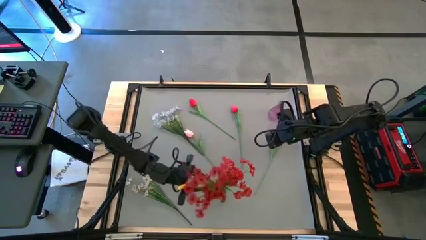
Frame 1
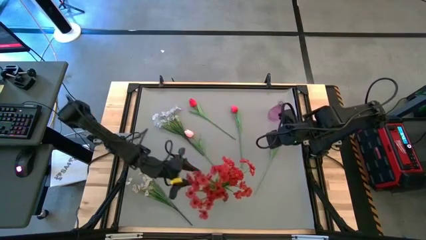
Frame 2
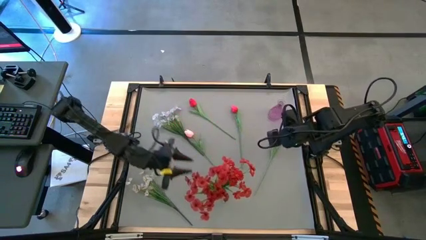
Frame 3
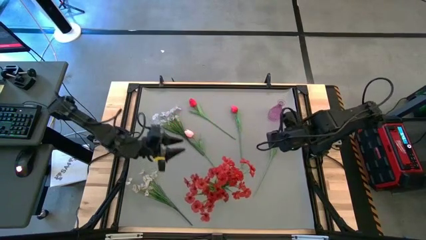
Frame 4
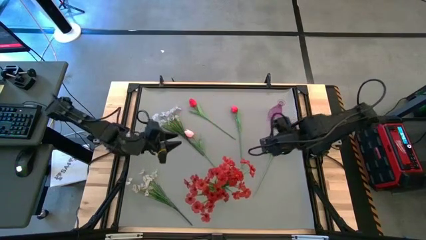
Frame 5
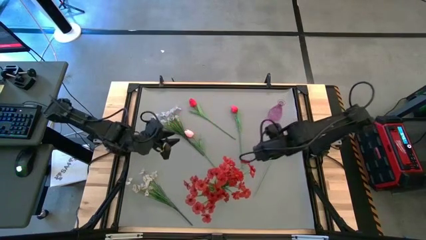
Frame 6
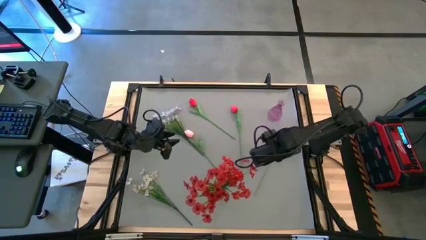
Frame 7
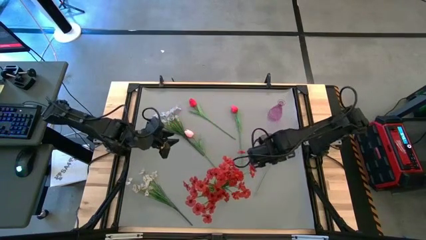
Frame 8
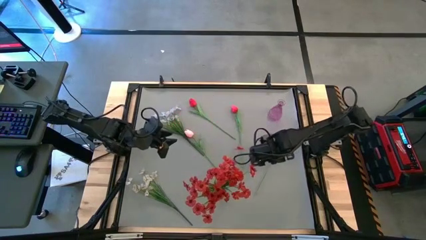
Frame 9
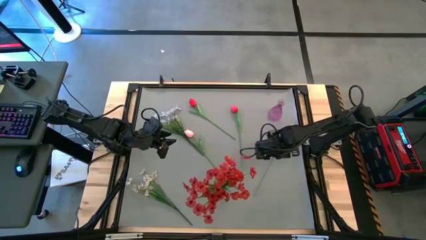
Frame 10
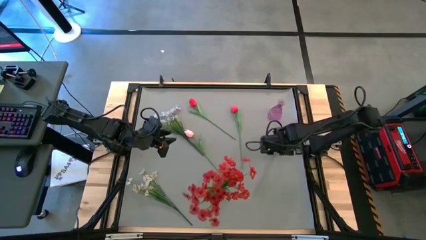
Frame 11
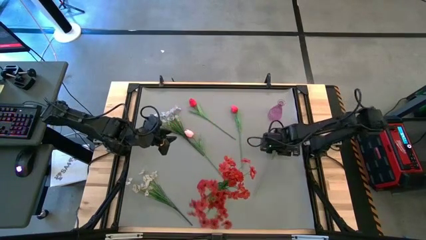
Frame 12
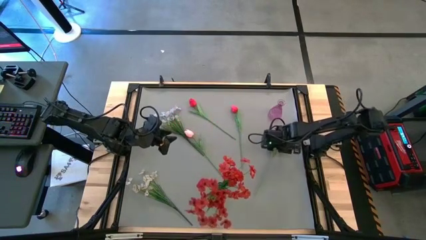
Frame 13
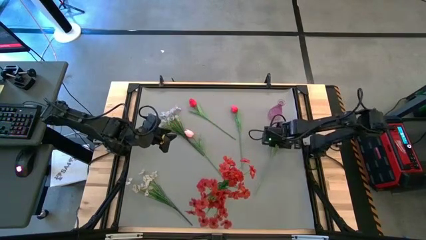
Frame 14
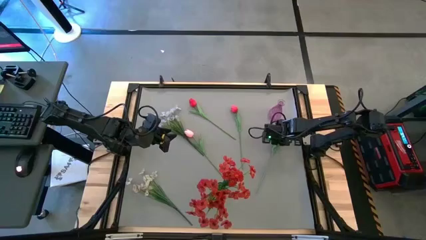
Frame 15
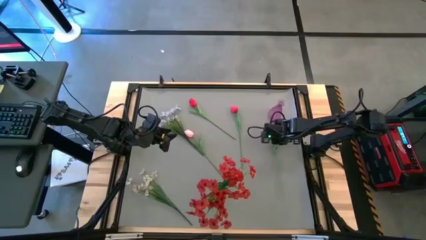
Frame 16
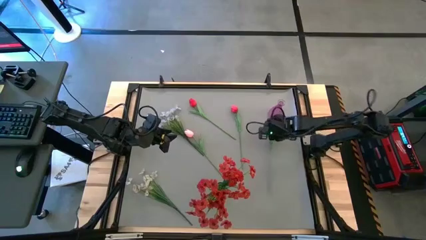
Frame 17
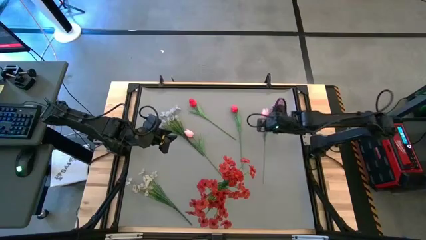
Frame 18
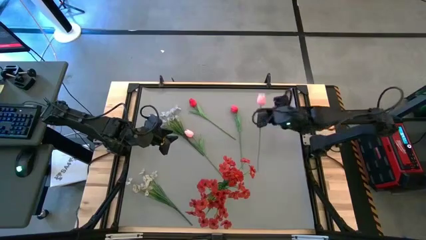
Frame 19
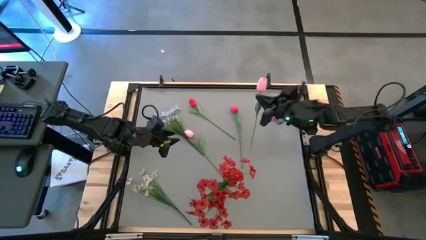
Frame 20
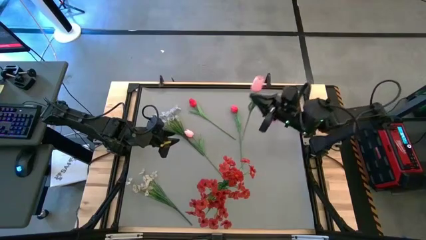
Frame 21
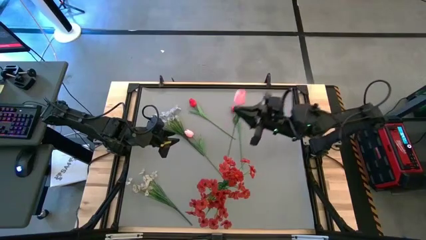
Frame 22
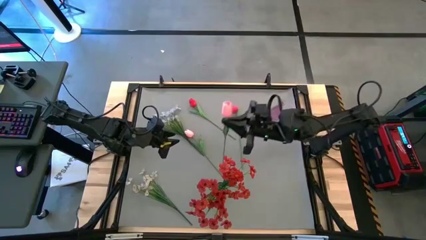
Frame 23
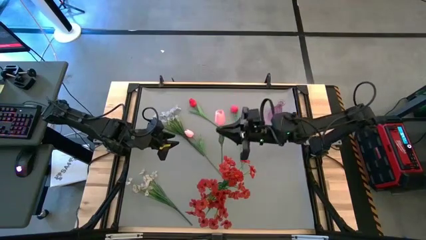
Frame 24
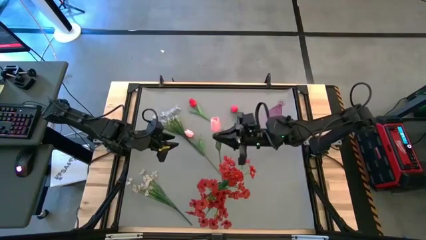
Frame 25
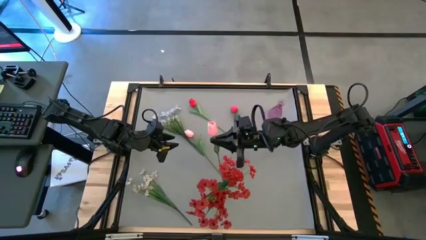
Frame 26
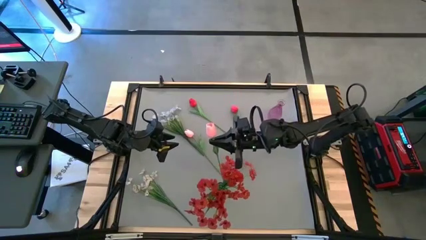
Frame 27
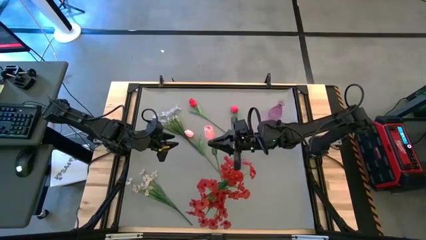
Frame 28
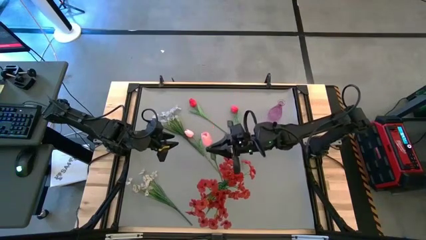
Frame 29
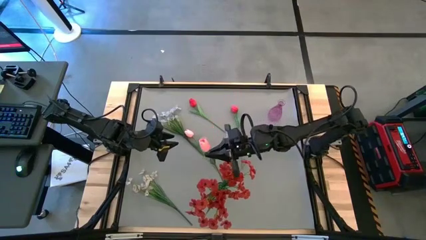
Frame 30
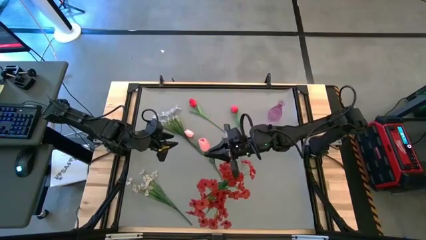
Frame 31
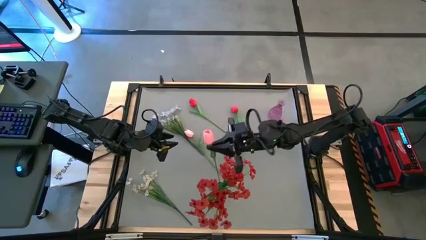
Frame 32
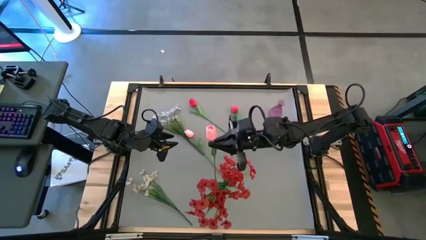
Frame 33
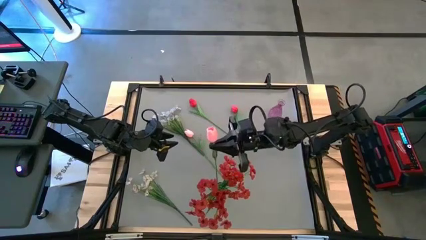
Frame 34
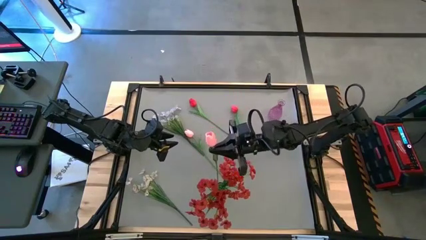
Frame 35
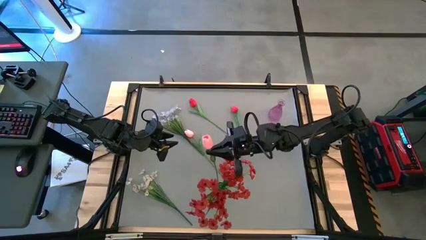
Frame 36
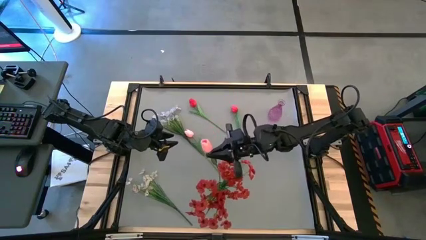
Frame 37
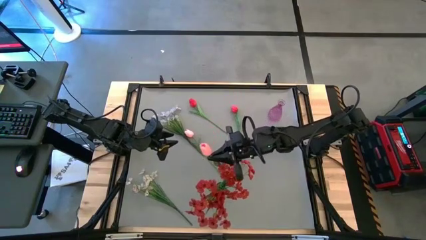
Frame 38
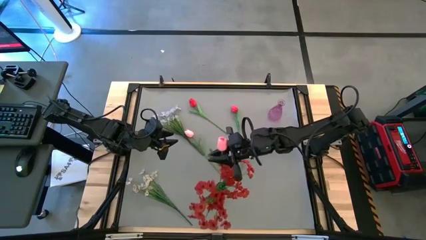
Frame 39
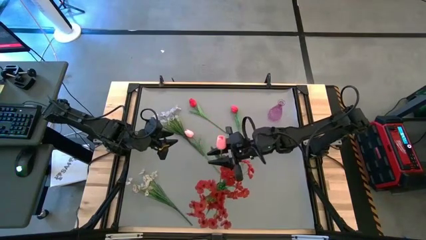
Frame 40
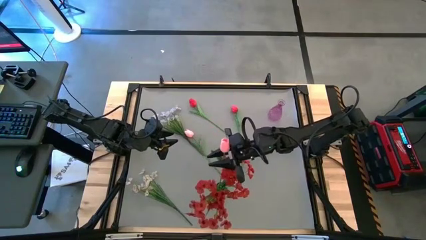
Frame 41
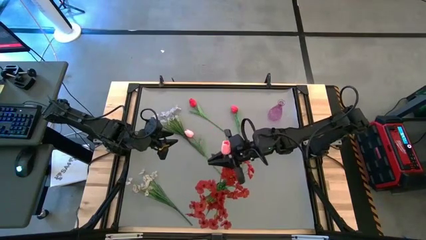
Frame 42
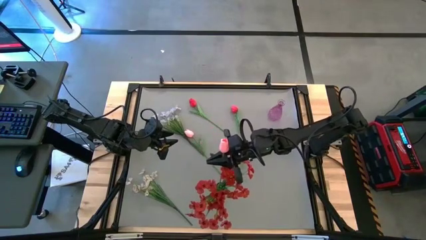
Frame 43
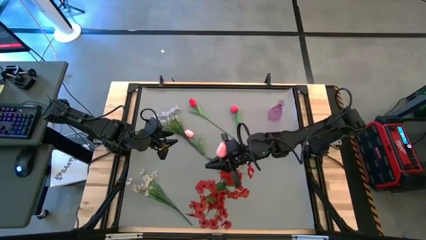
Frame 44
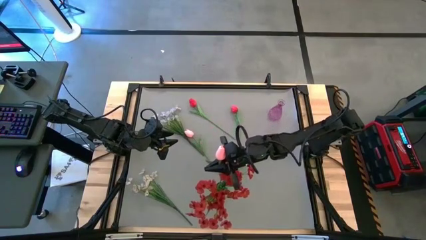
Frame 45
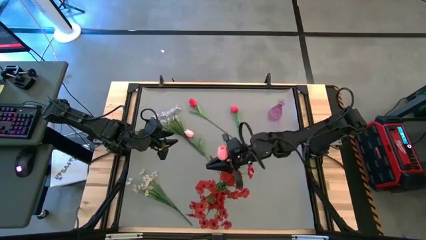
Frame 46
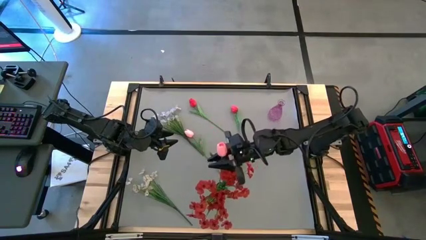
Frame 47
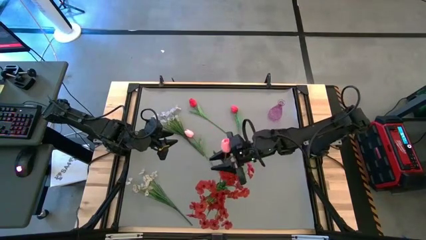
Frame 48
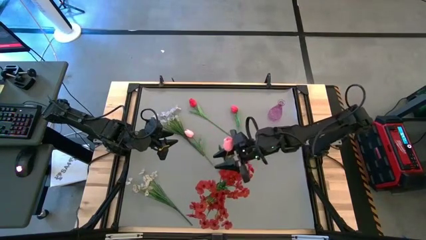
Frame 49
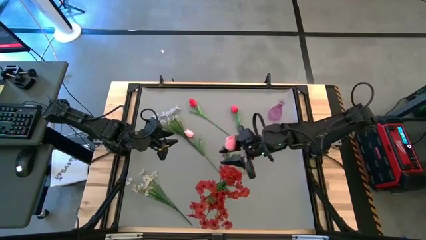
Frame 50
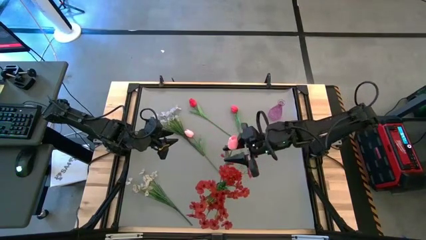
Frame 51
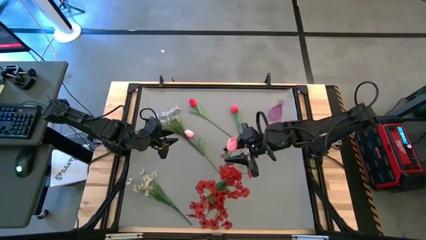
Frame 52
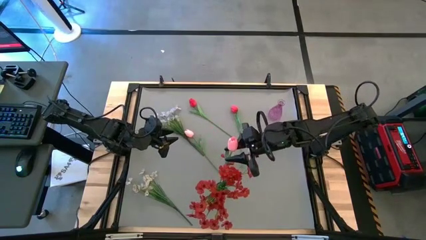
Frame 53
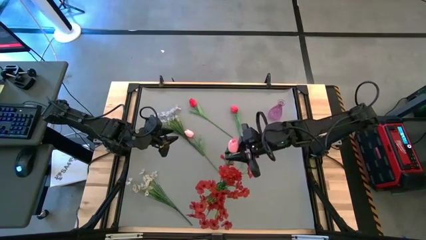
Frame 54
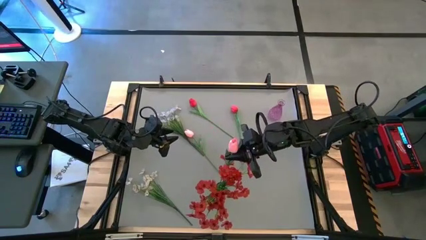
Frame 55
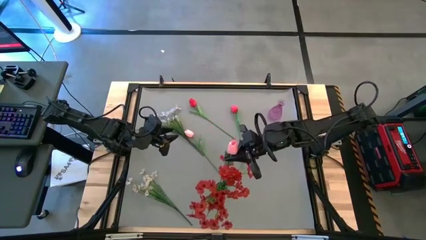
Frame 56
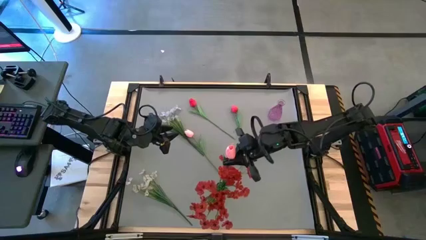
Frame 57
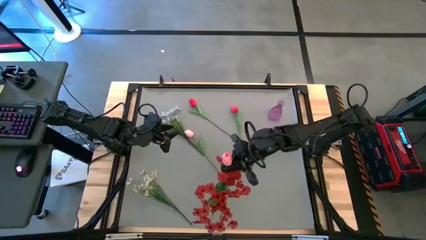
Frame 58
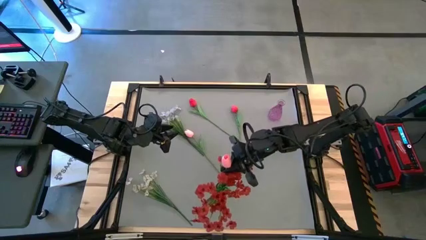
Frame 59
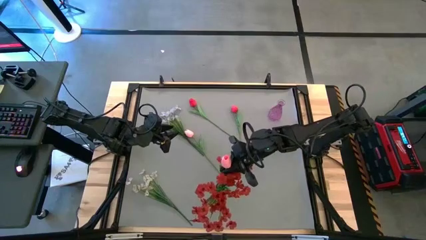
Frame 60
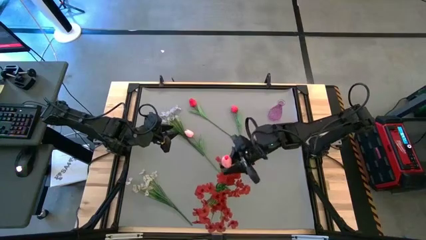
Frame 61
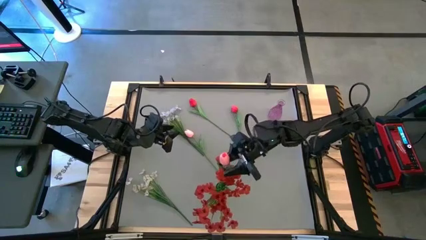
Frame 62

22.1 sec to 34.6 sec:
Task: Sort flowers into vase by color
Put the right pink flower into the green vase

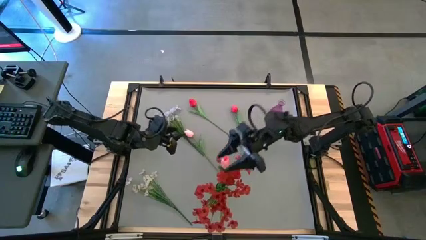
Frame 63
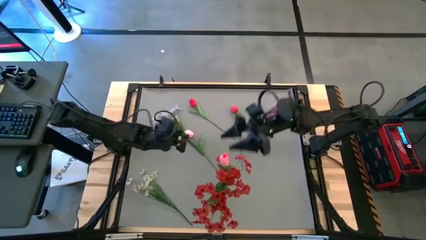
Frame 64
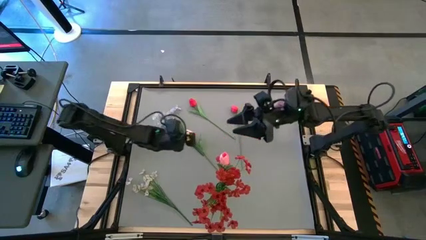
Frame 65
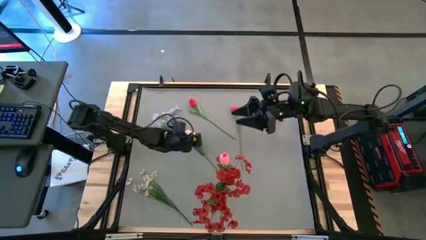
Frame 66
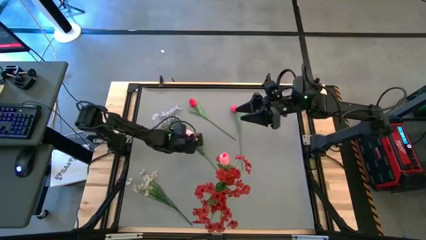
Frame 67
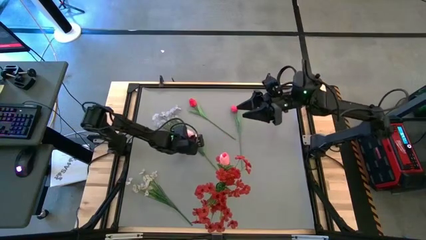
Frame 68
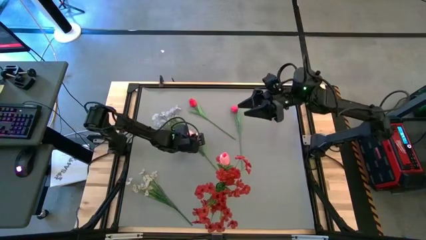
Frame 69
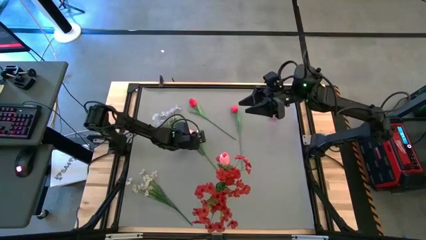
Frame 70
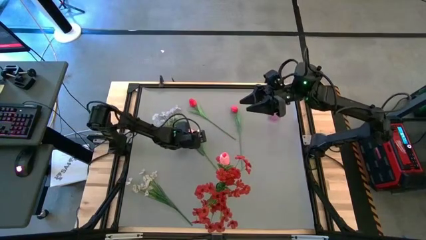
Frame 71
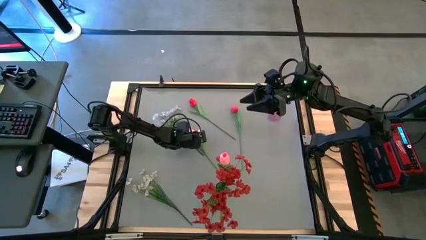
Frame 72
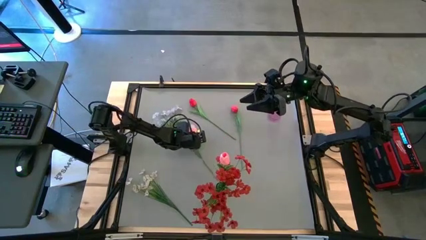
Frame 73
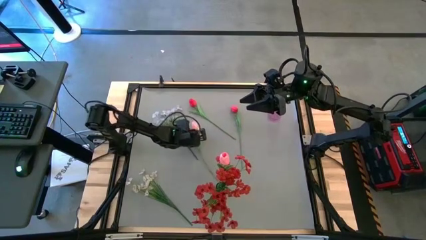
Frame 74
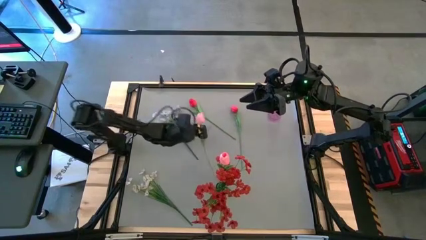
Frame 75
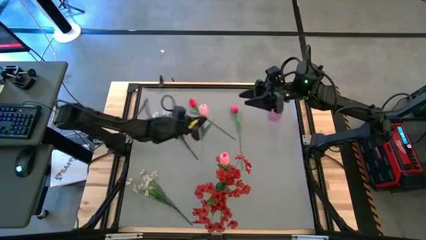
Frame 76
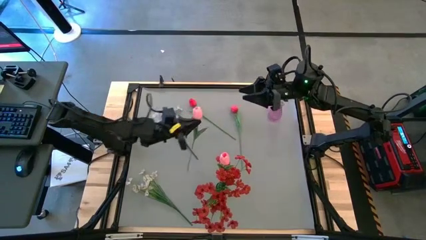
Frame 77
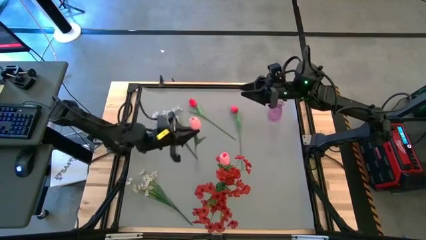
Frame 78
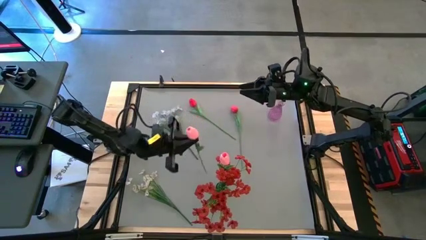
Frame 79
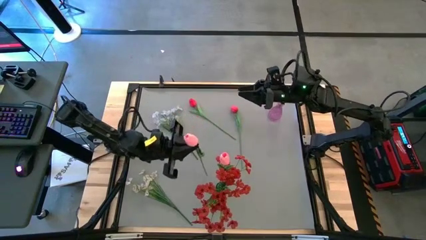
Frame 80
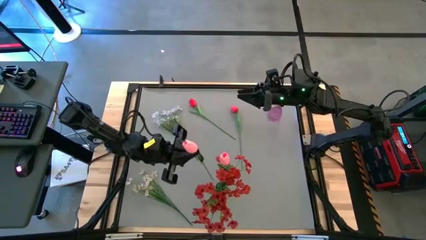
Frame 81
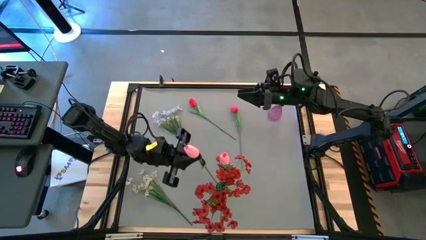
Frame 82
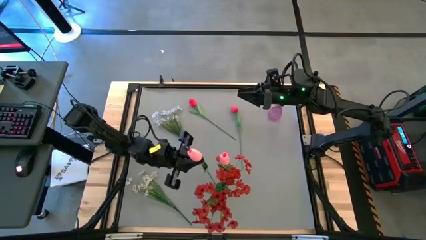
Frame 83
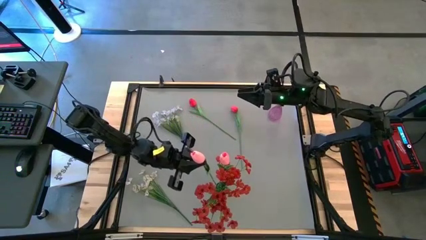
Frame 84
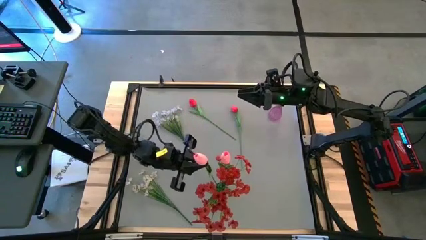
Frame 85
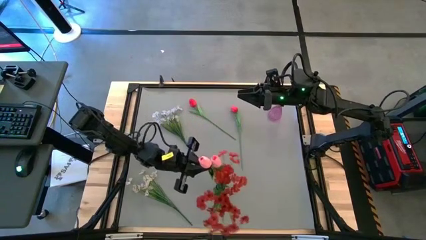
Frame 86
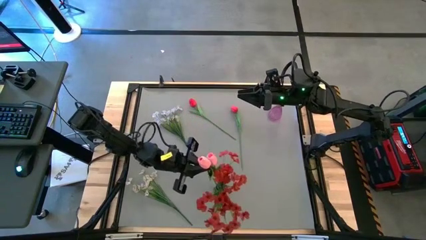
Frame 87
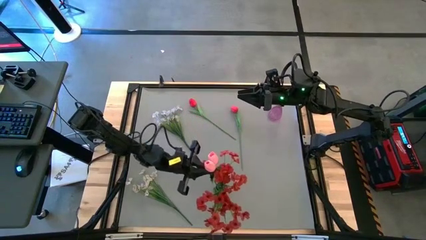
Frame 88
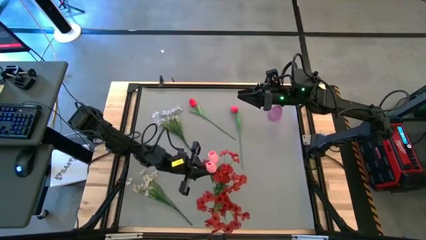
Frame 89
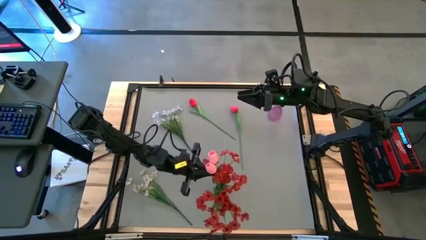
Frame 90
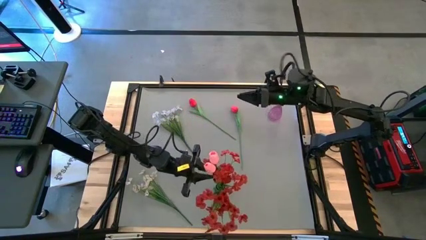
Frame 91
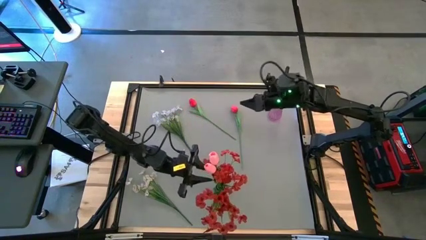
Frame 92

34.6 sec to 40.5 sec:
Put the left pink flower into the green vase
